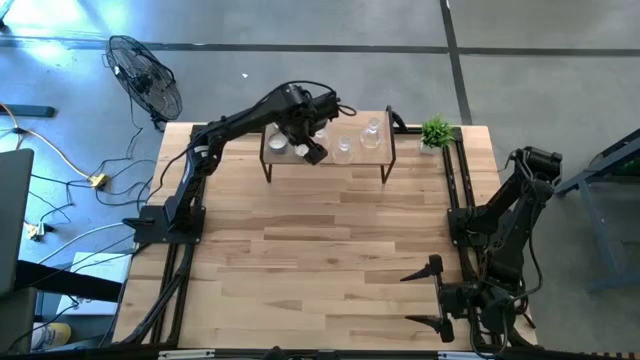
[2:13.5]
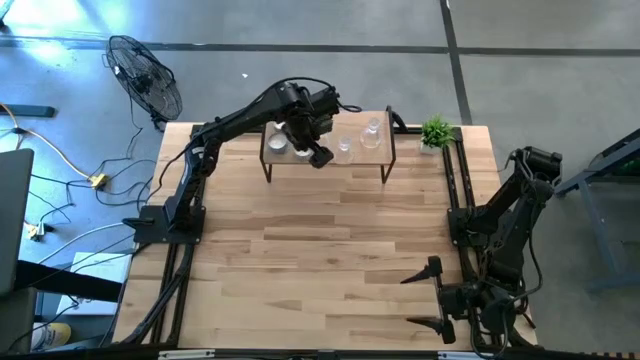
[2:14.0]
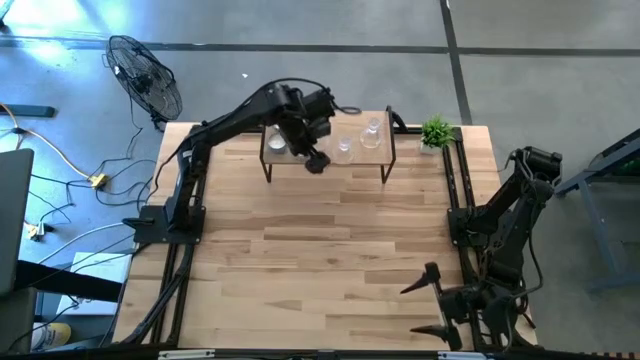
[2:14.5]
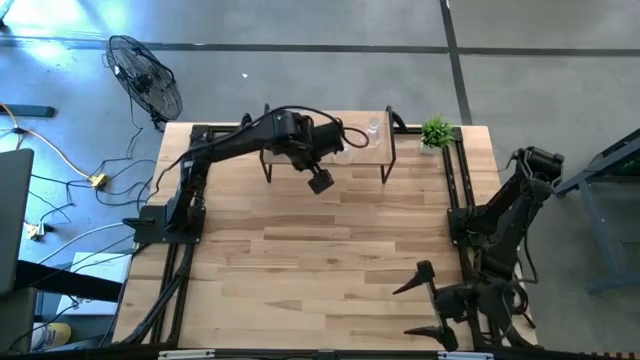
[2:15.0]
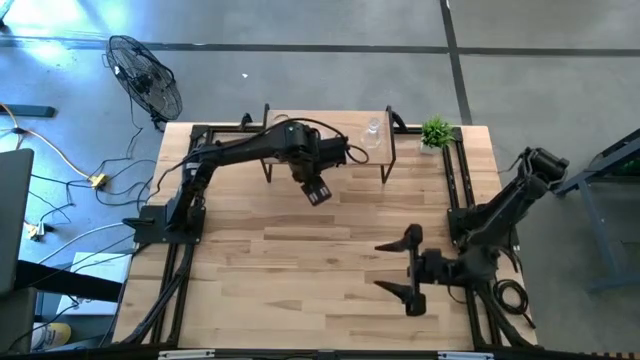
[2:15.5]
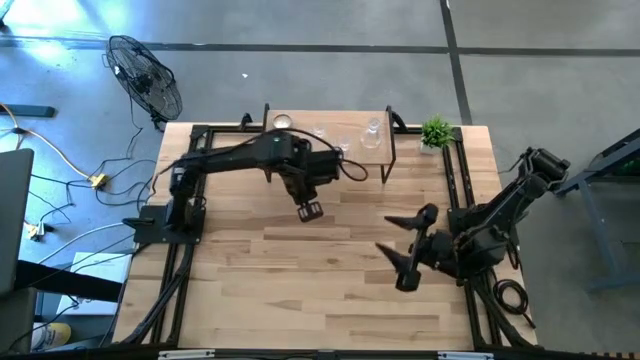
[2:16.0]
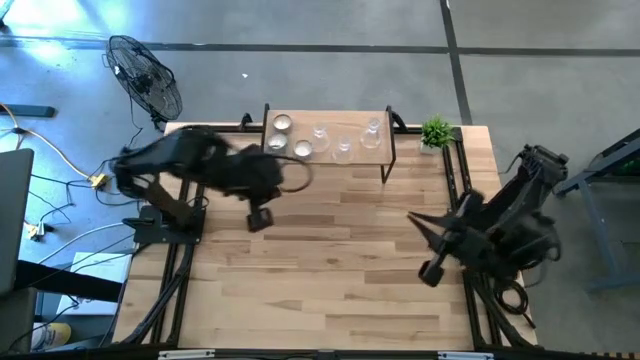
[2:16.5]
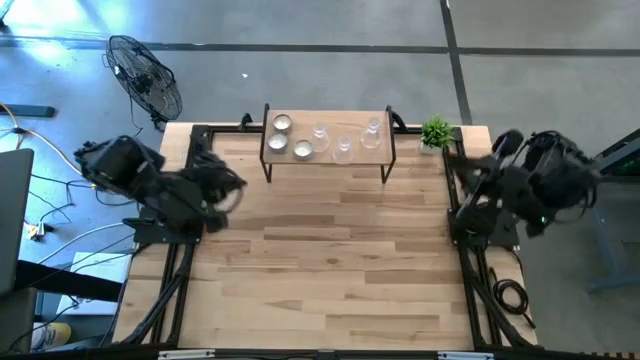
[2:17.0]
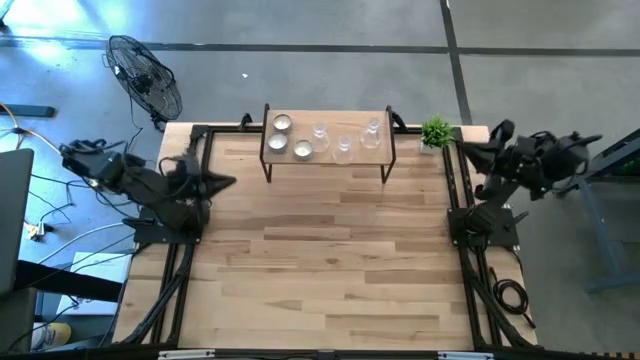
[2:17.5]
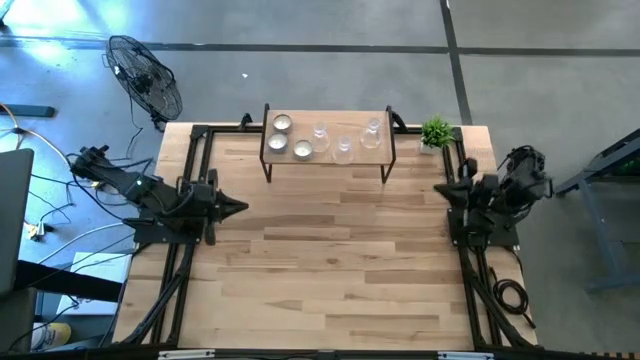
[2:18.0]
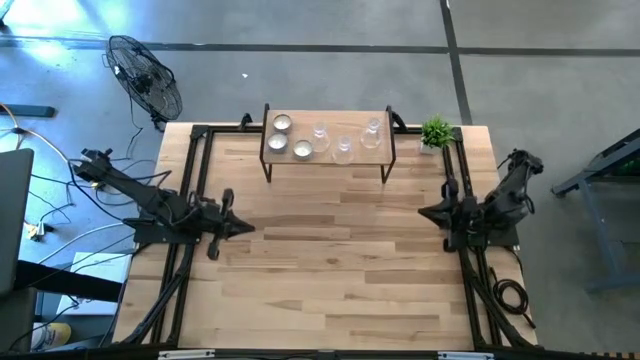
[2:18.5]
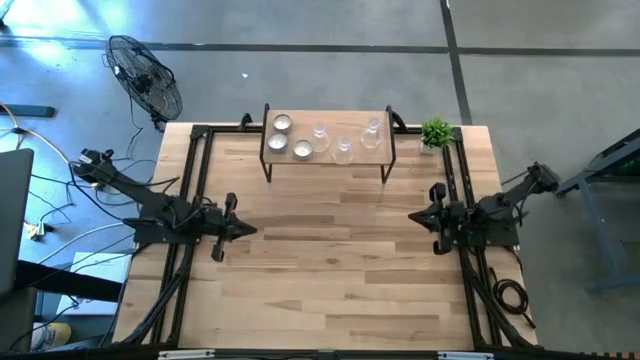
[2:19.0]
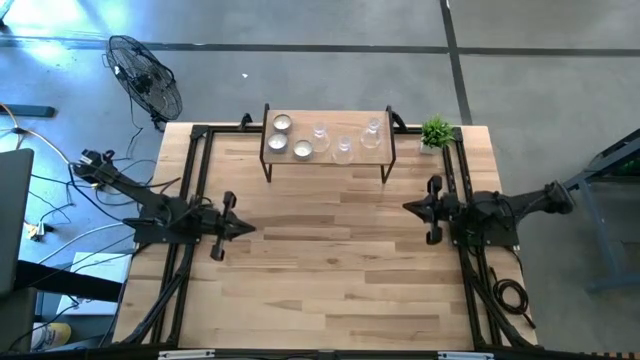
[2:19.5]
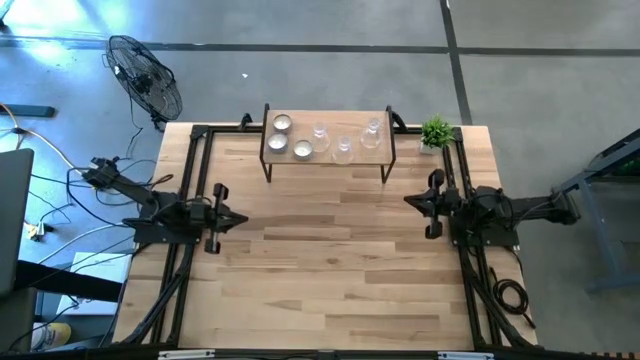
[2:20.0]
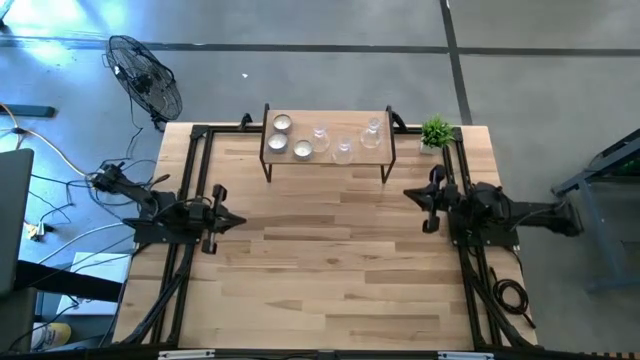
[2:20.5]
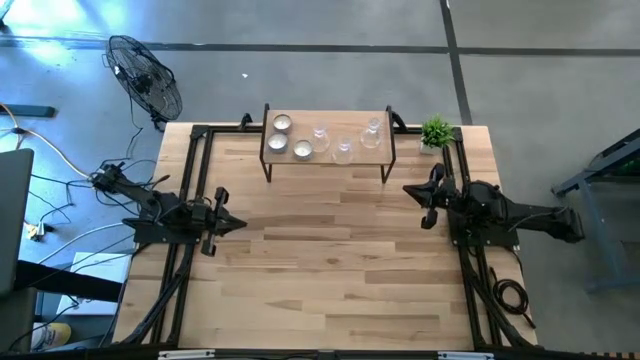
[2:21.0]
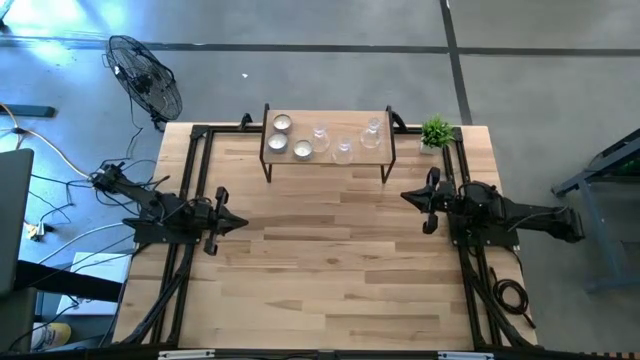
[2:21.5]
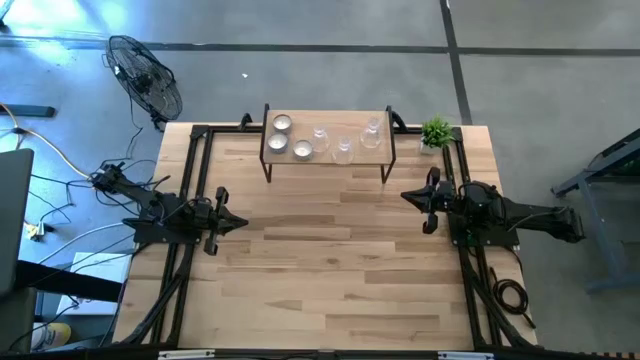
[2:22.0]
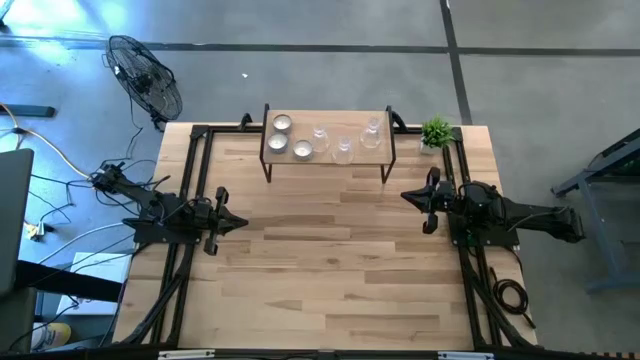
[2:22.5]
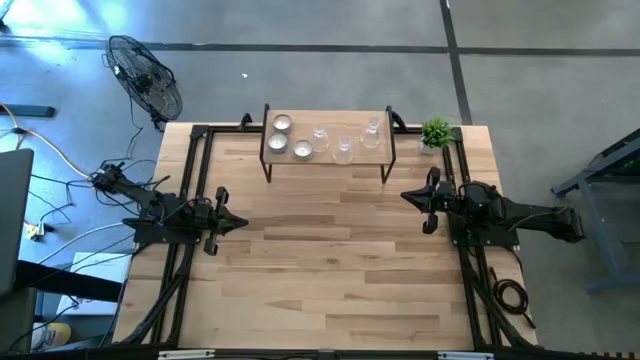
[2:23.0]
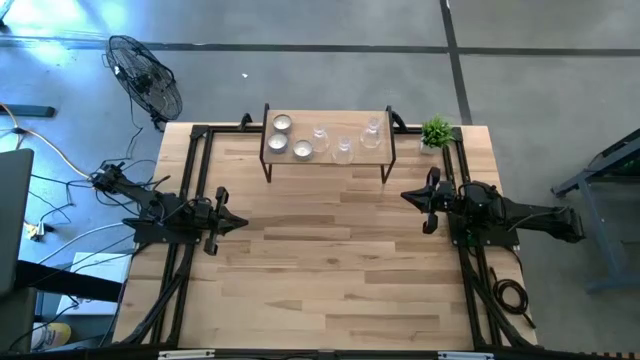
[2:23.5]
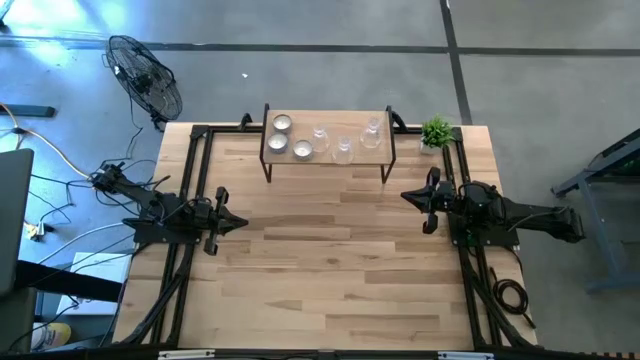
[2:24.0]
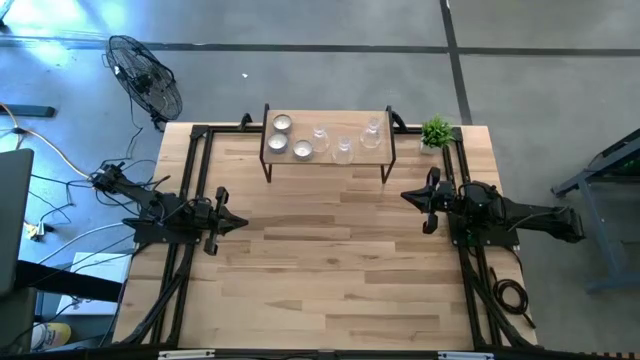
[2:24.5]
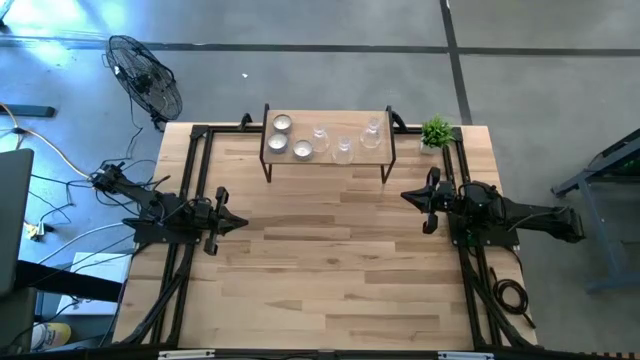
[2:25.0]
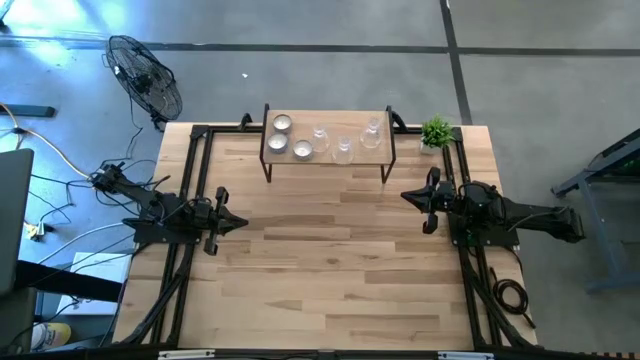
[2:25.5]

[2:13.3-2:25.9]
Task: Pick & Place candle stick holders
Return to Home Position

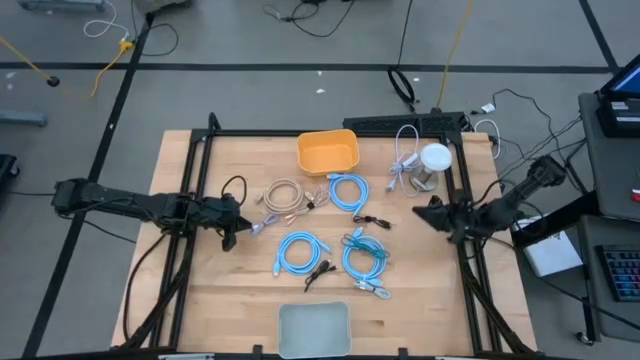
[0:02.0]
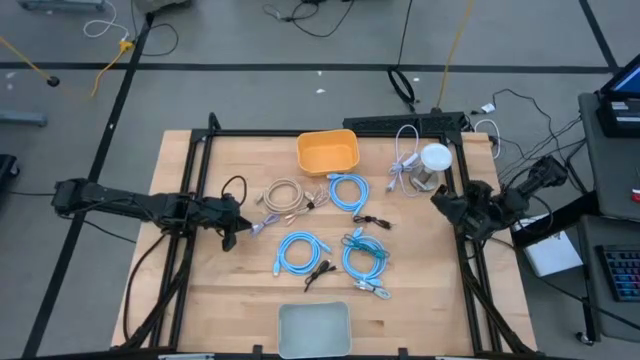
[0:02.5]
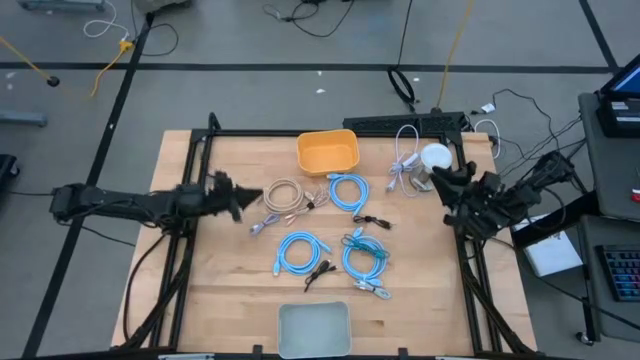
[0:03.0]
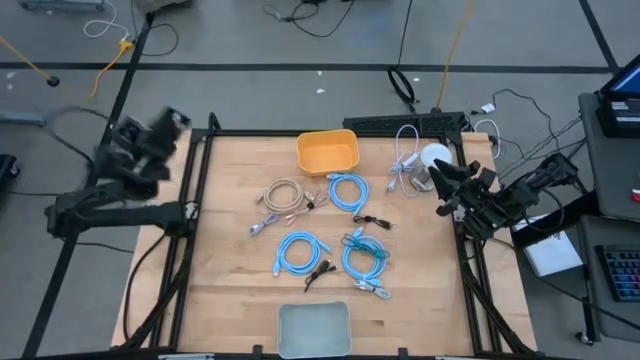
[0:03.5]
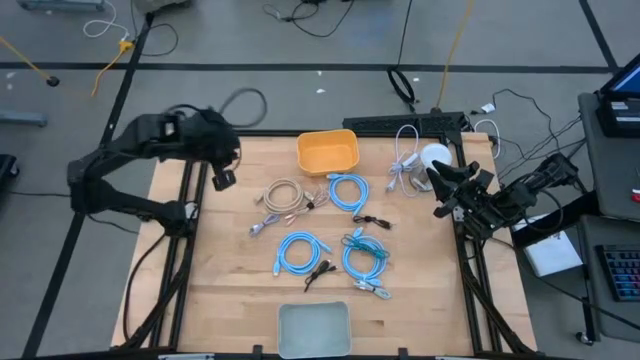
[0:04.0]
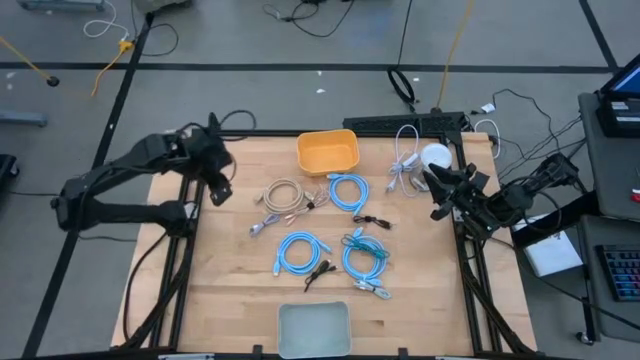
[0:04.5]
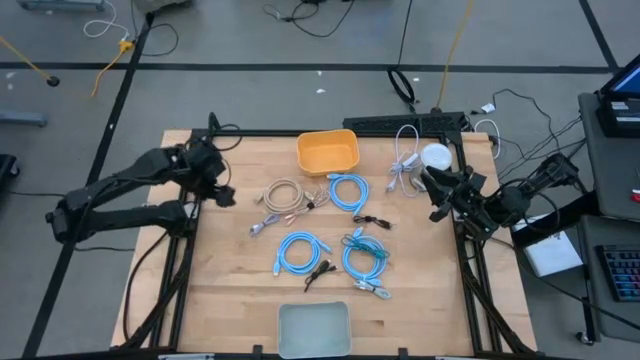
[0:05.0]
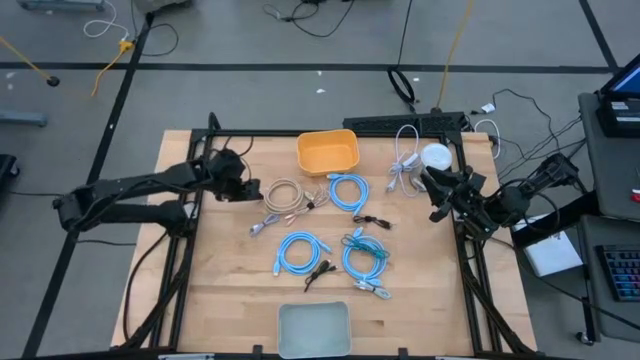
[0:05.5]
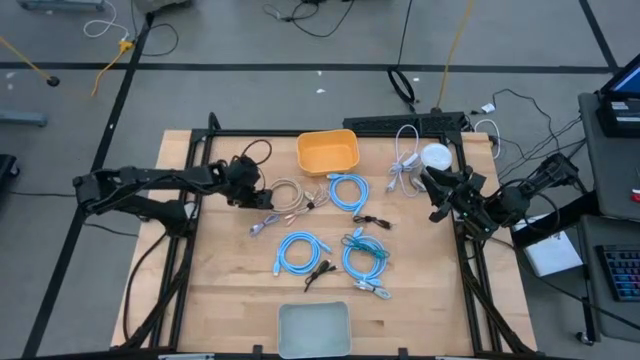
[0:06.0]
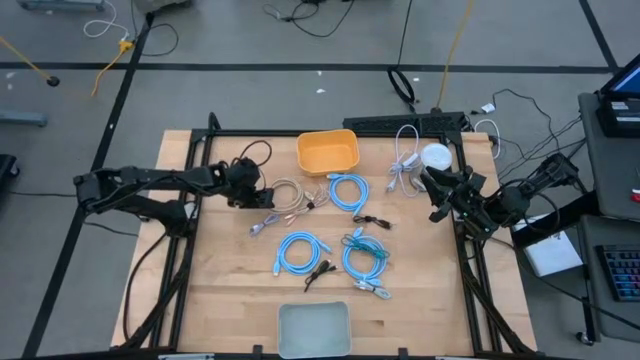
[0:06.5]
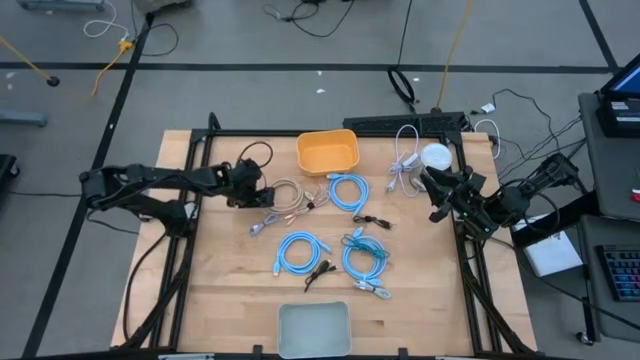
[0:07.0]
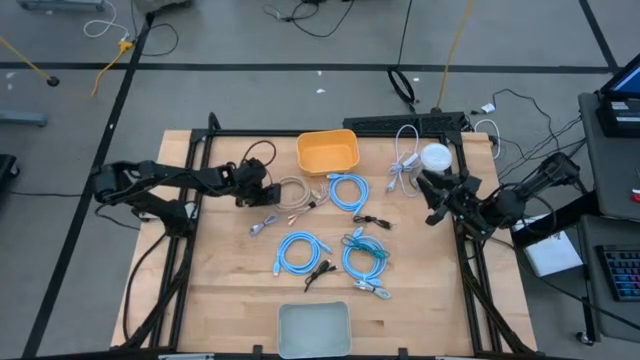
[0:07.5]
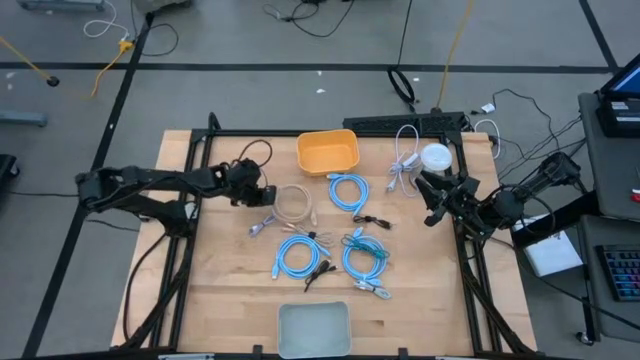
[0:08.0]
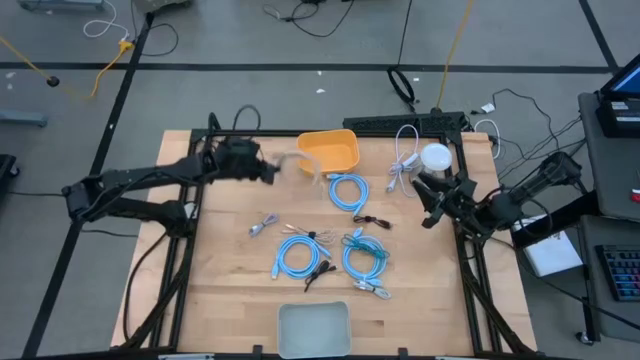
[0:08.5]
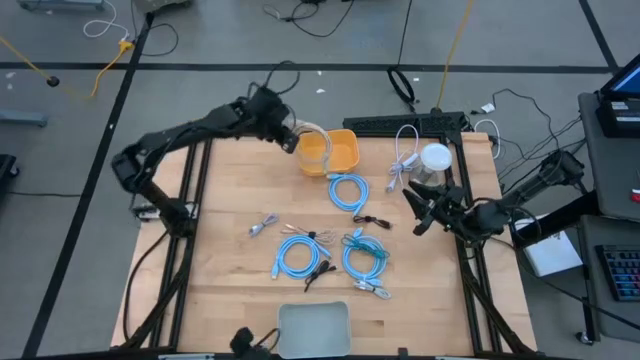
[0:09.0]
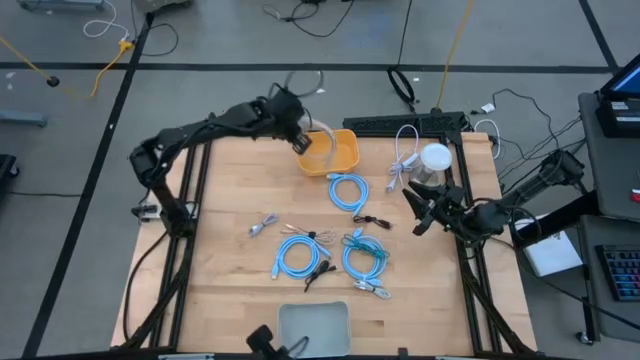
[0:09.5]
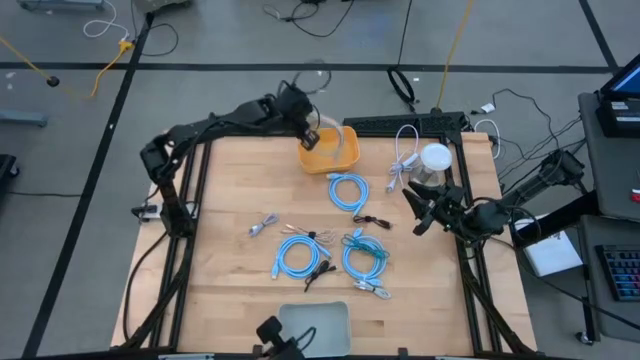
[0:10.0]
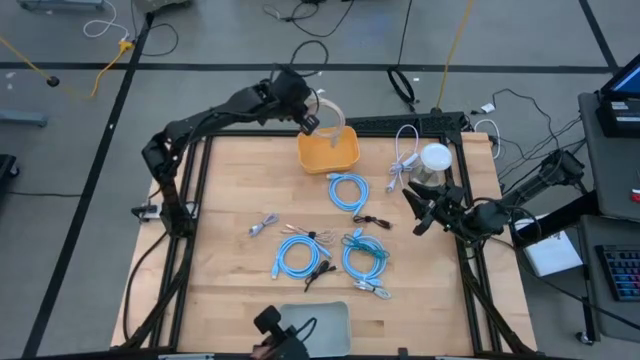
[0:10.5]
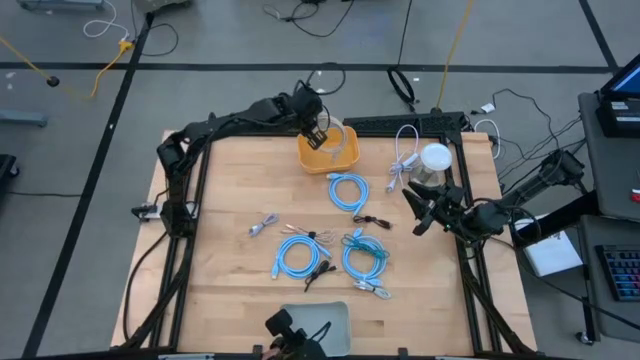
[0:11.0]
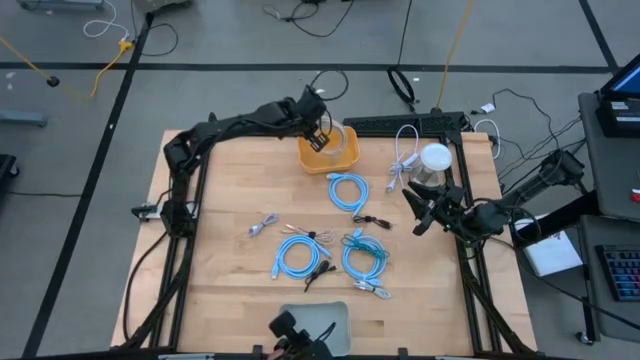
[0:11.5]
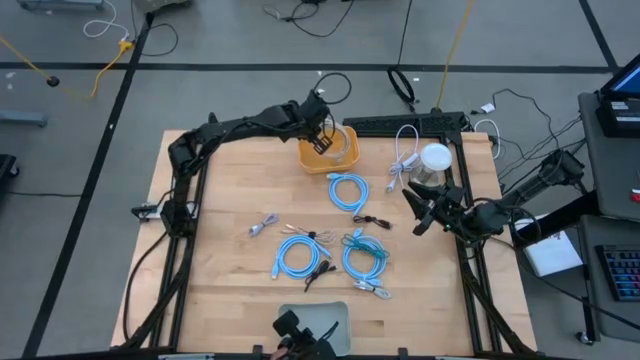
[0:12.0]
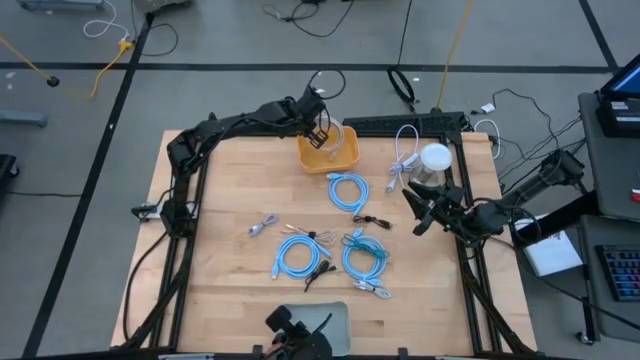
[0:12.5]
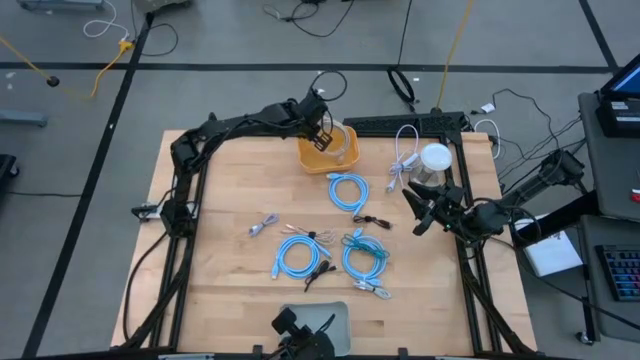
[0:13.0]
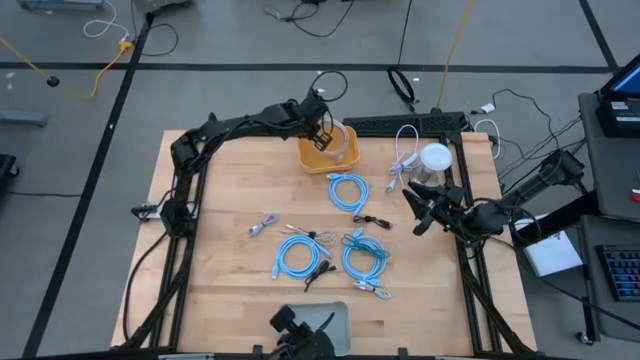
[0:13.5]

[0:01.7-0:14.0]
Task: Pick & Place USB Port
Put the brown HDMI cable into the yellow bin
